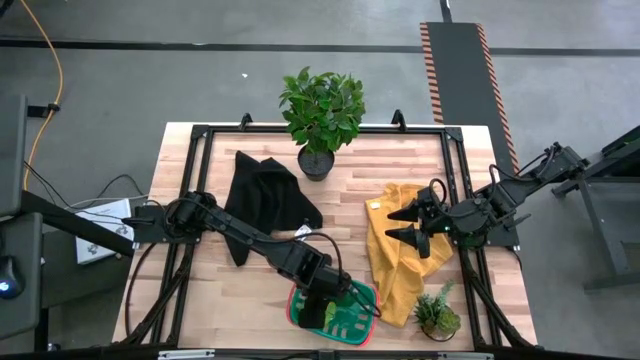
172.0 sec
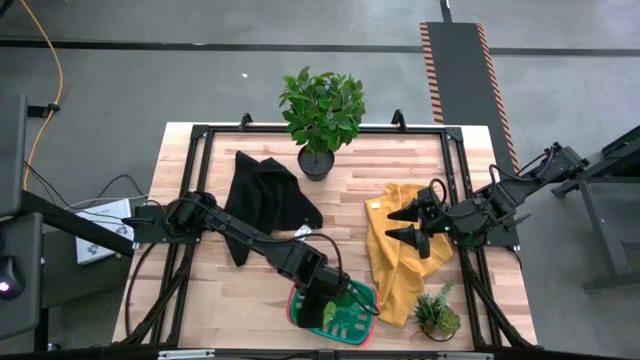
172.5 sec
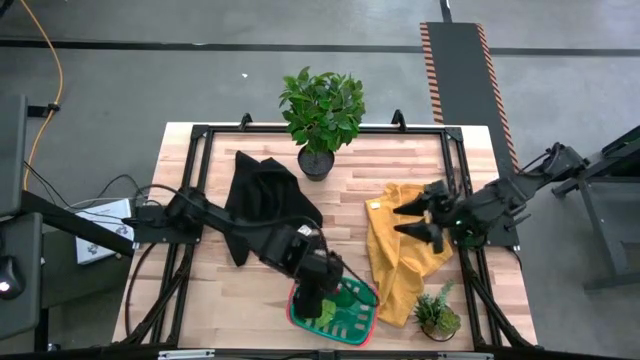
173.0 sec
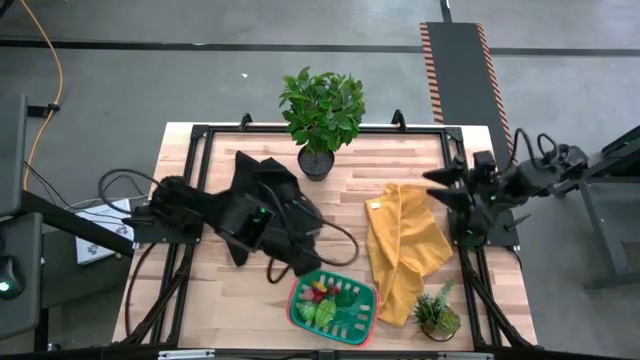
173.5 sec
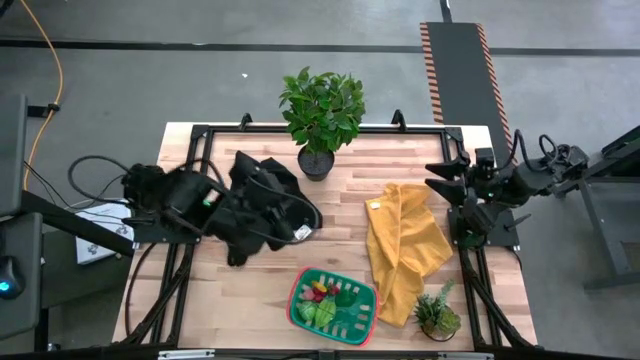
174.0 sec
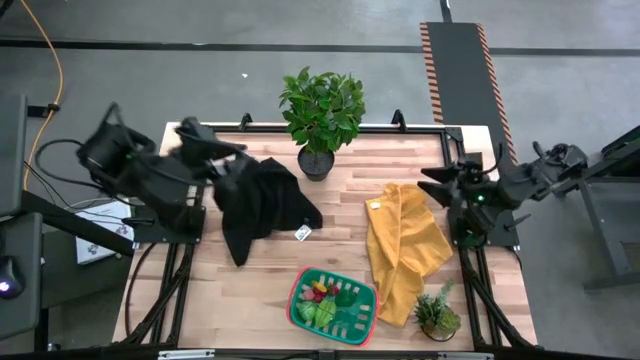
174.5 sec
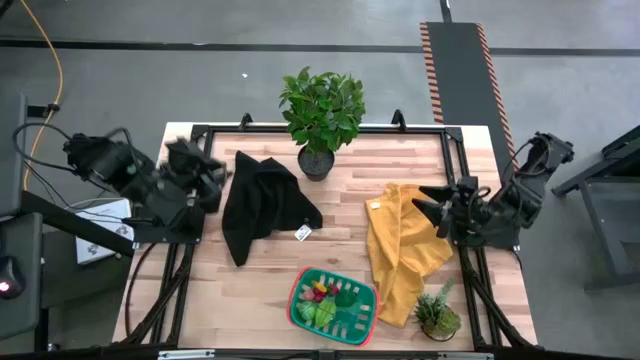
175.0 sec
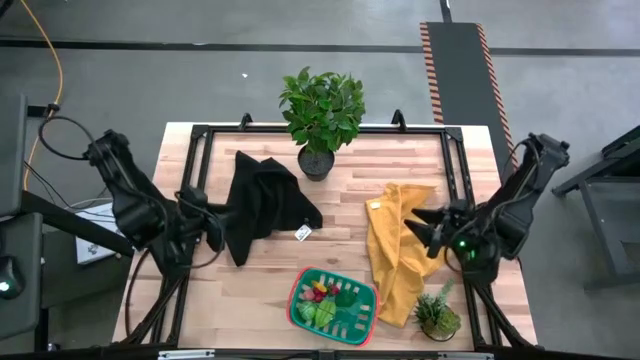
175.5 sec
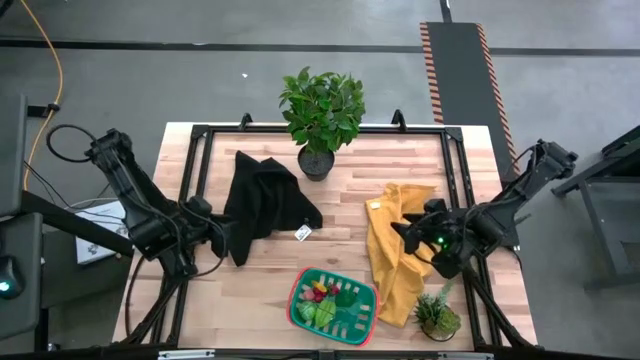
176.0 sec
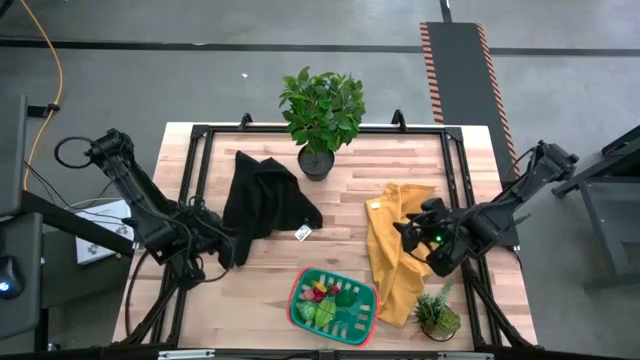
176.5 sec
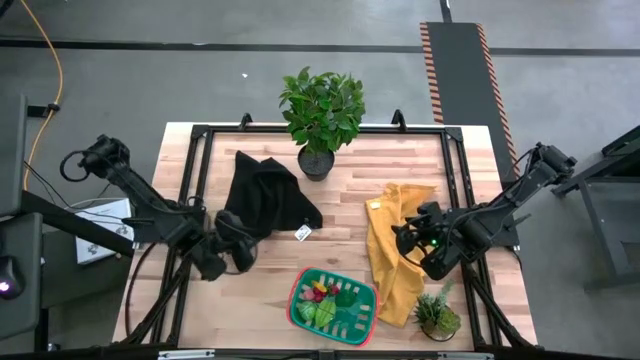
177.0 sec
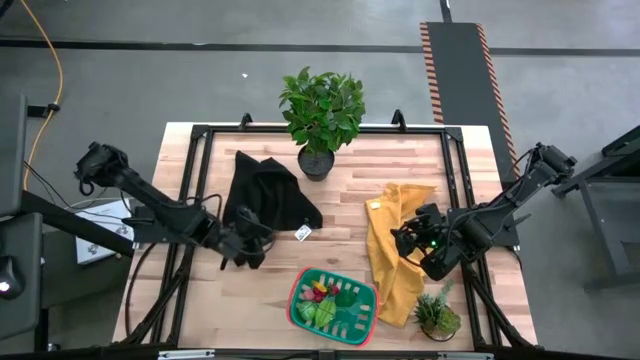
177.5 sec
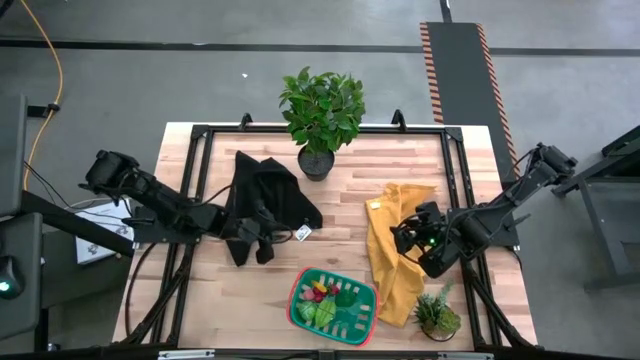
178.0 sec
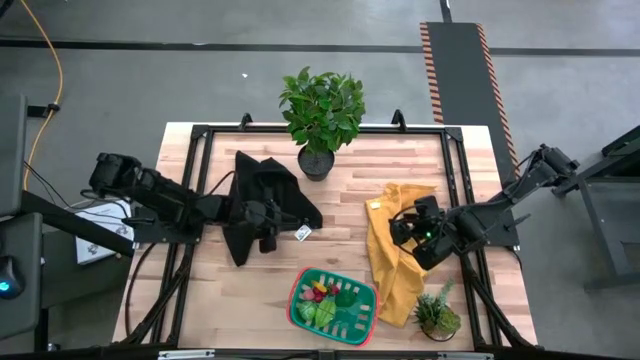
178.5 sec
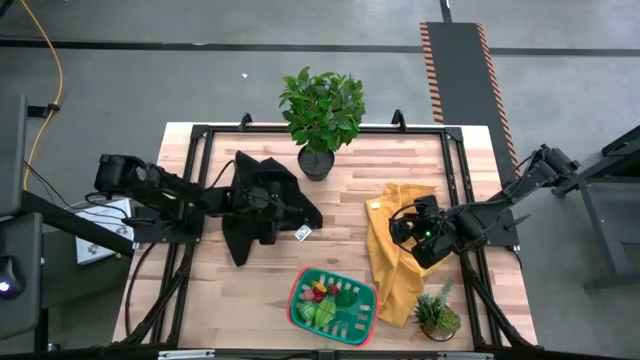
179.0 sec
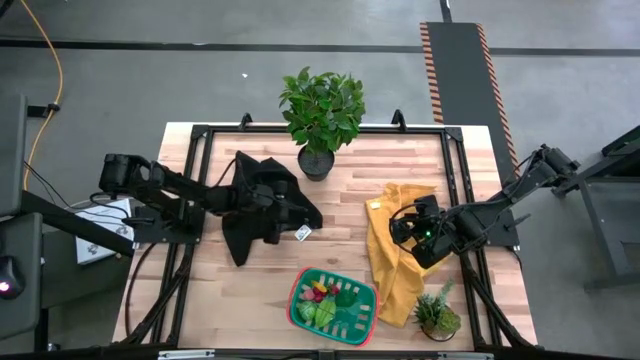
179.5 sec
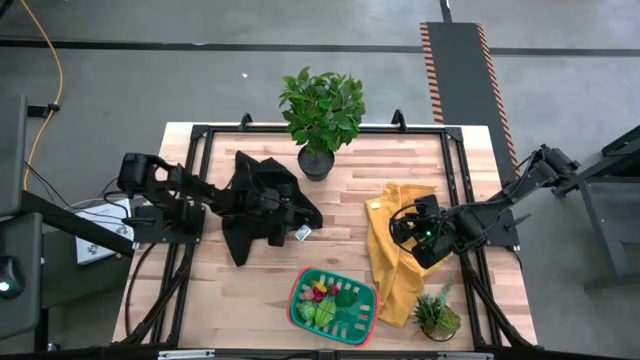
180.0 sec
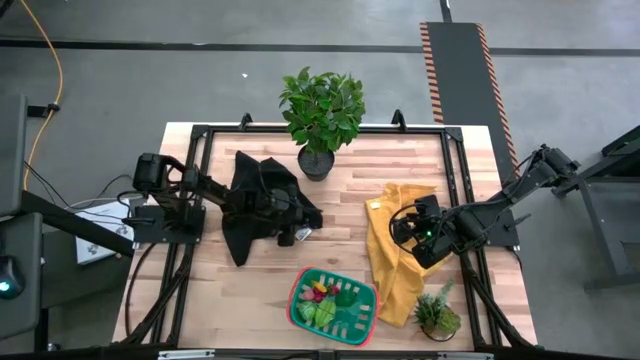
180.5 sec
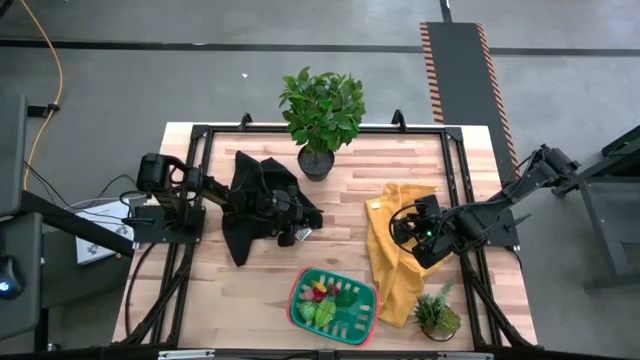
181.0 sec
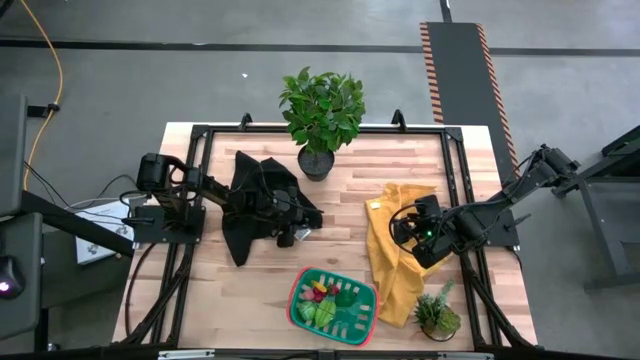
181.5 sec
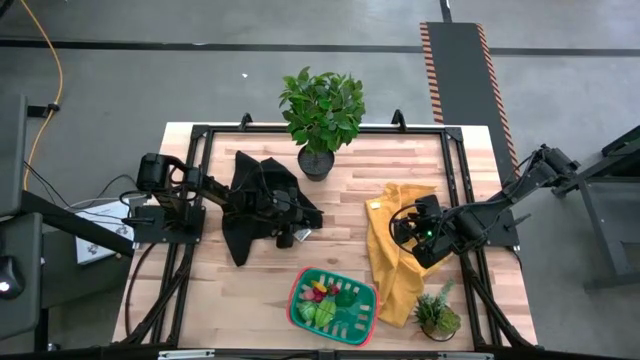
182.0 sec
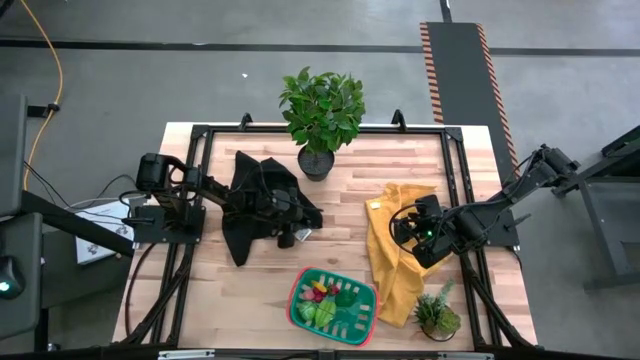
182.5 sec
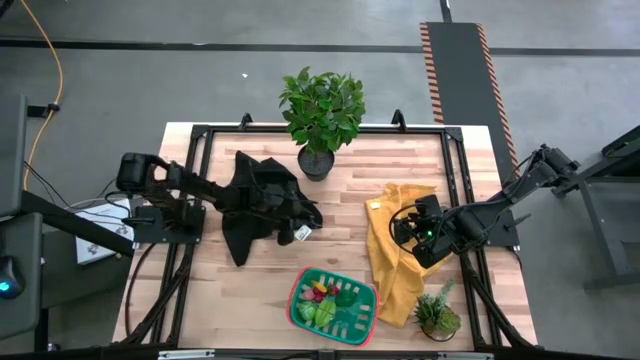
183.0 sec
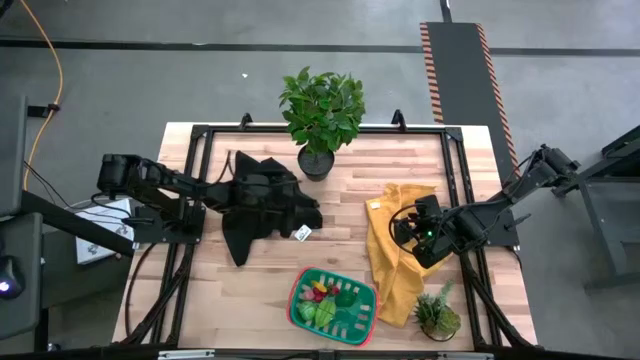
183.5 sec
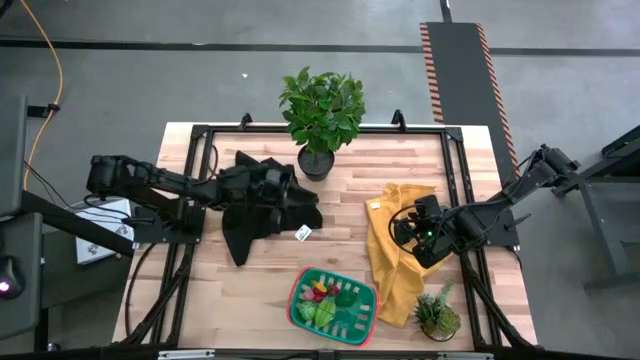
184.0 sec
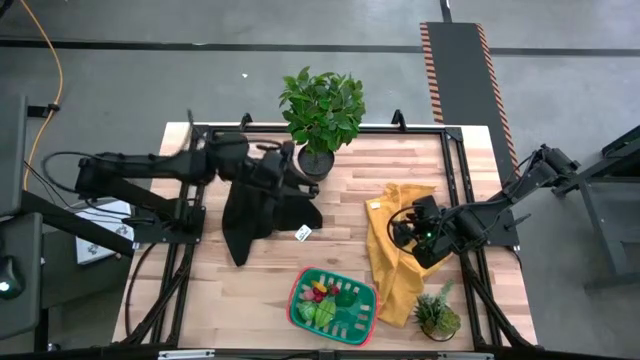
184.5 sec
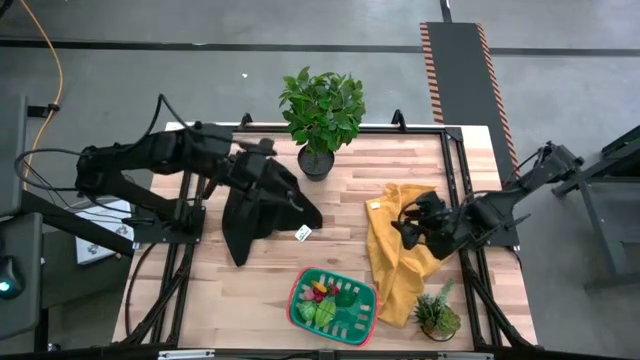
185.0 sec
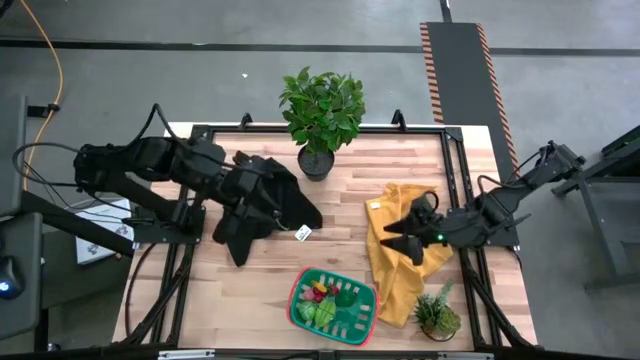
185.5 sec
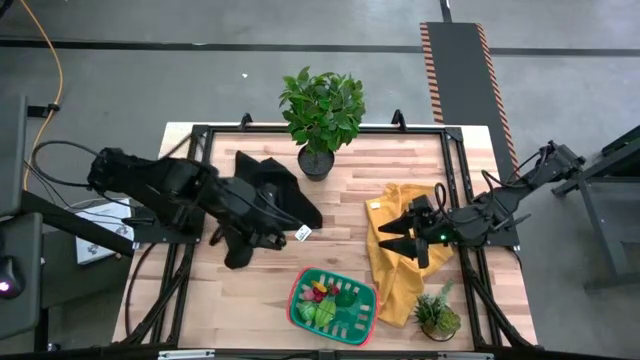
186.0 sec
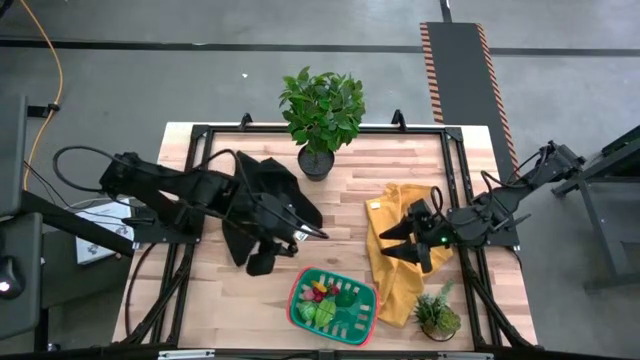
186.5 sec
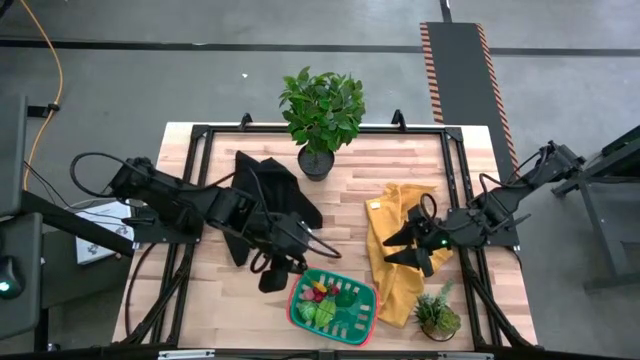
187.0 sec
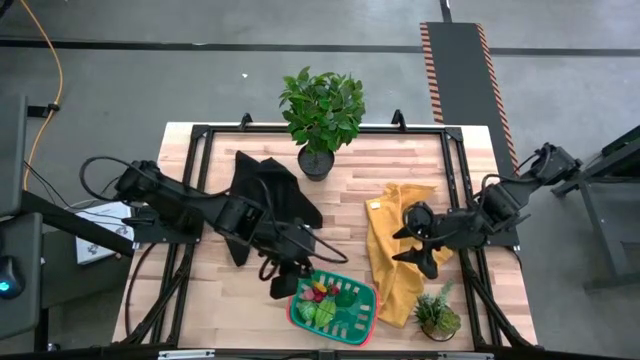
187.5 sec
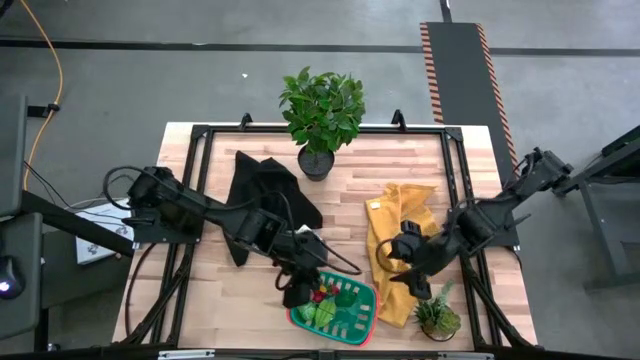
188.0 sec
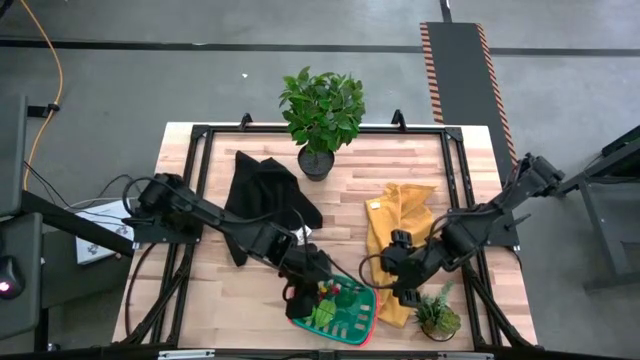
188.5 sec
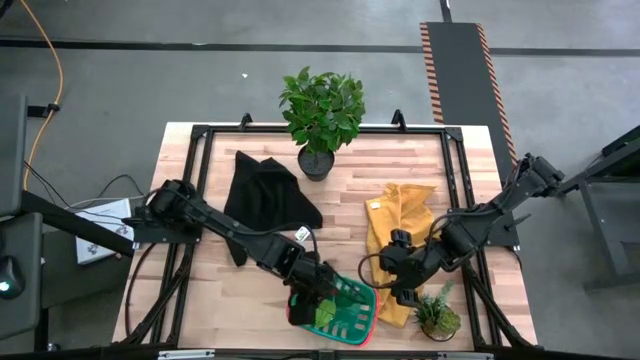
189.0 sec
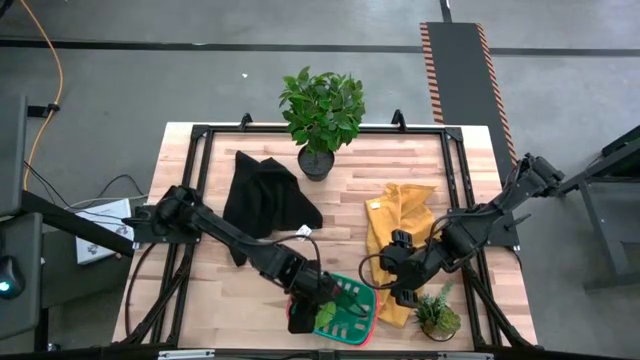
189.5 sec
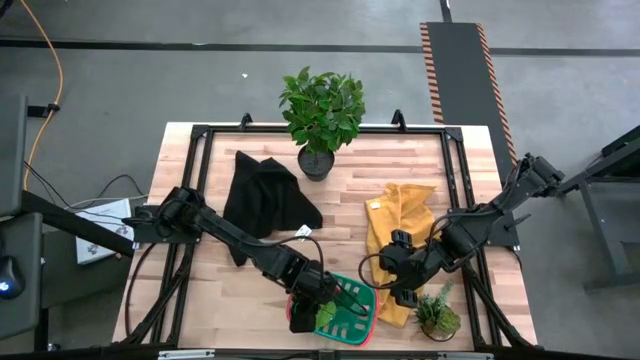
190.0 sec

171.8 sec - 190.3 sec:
Task: Pick and placing Produce into tupperware
Put the black cherry into the blue bin

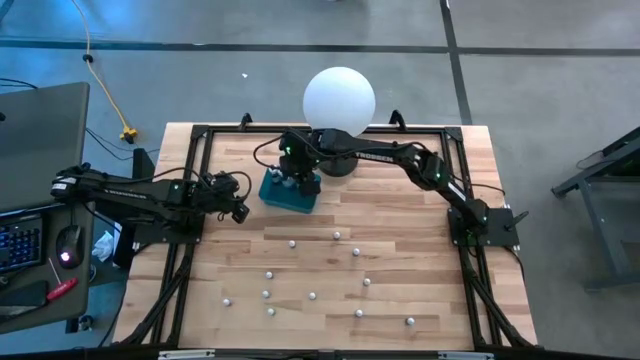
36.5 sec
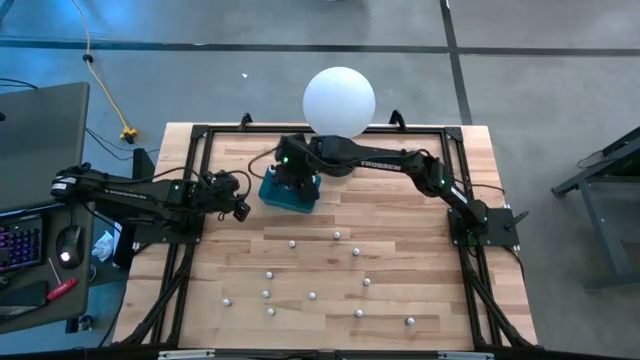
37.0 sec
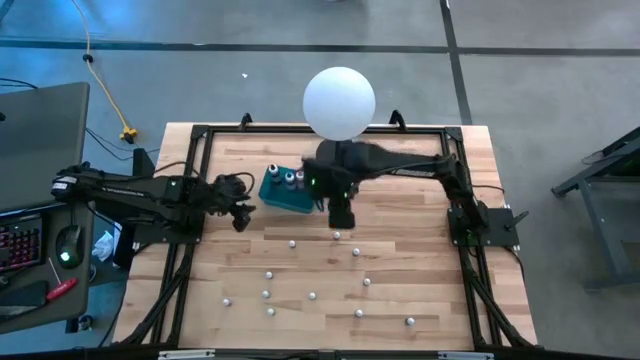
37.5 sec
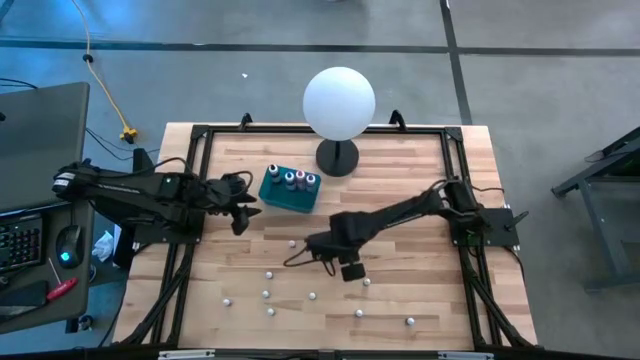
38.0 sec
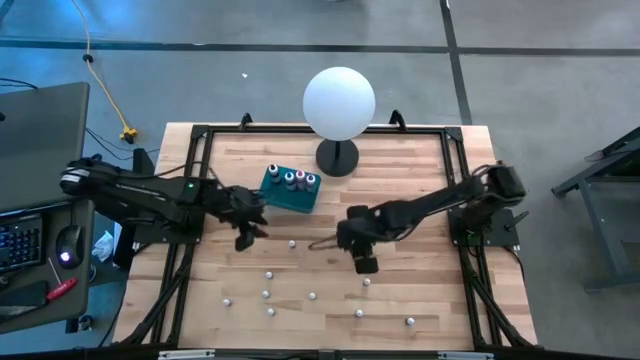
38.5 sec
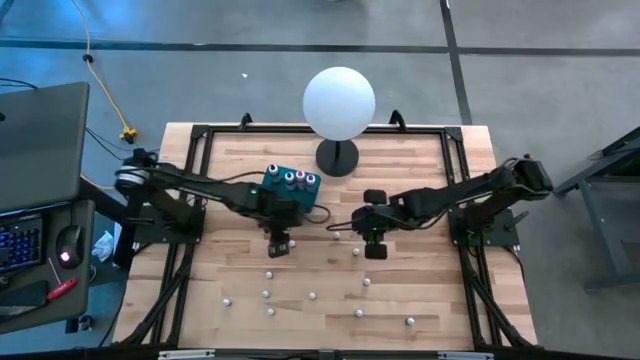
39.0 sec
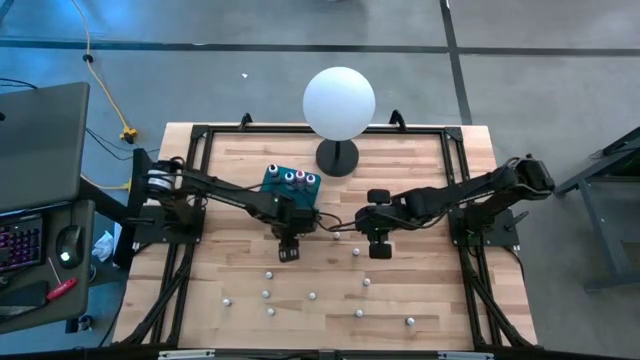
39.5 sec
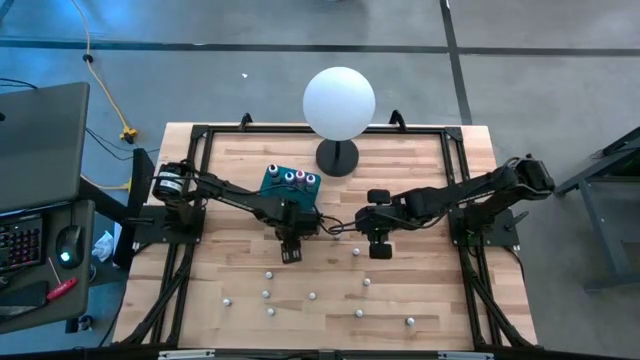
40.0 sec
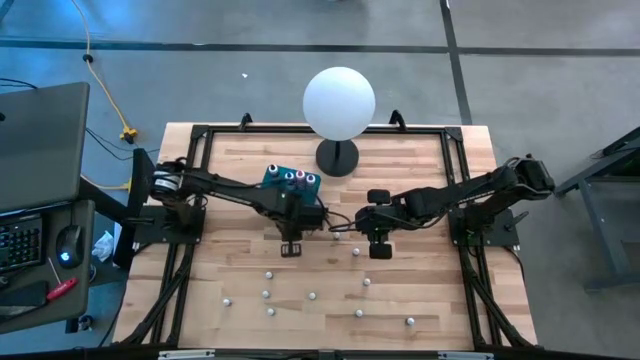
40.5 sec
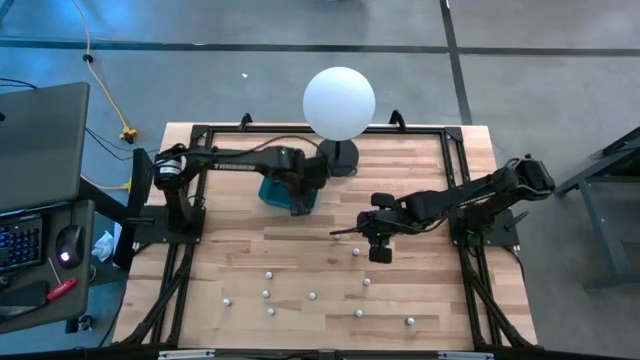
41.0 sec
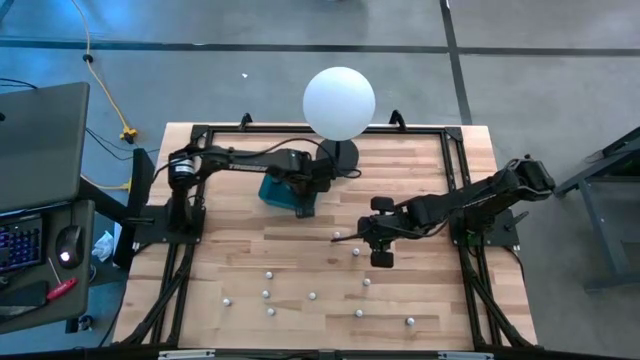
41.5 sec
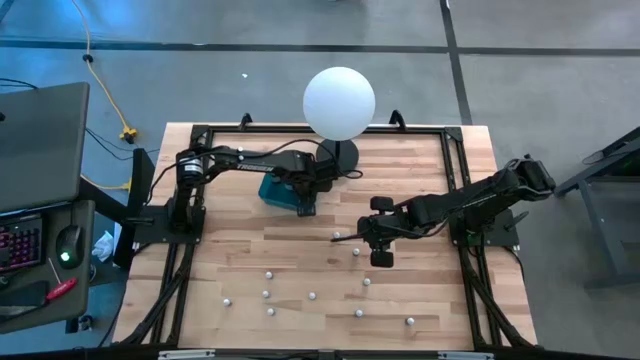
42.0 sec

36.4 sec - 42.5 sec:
Task: Pick & Place food coloring
Put the small orange food coloring bottle into the blue bin
